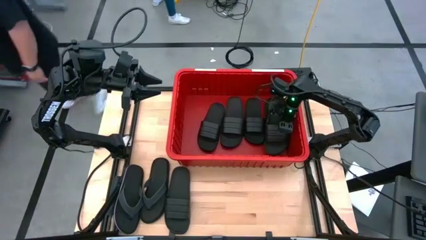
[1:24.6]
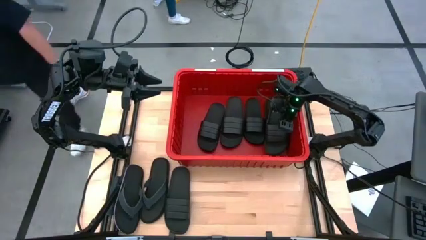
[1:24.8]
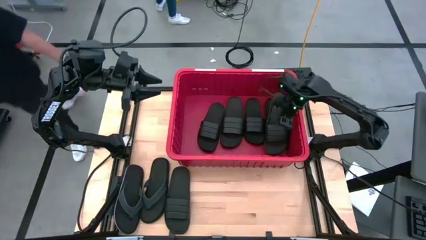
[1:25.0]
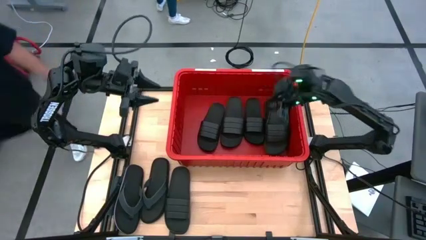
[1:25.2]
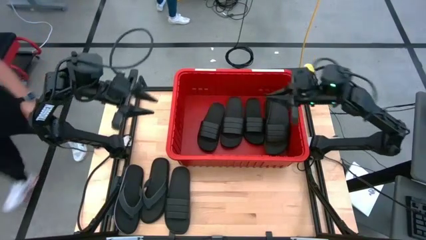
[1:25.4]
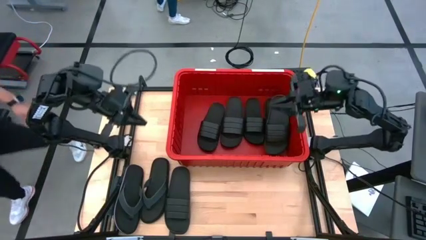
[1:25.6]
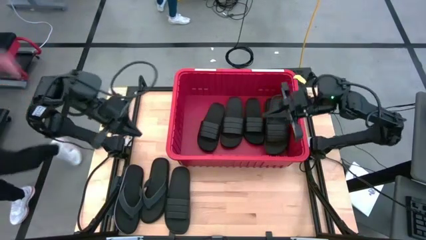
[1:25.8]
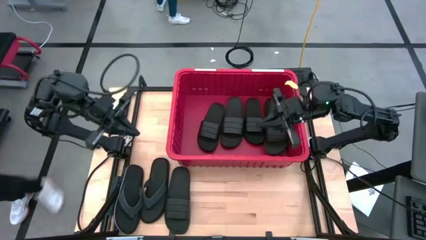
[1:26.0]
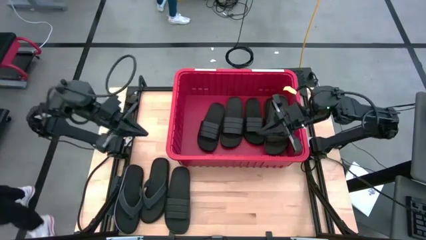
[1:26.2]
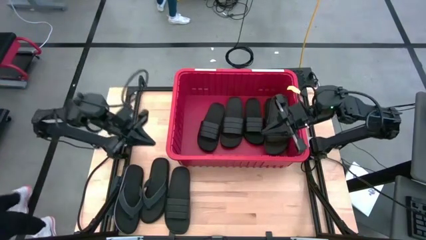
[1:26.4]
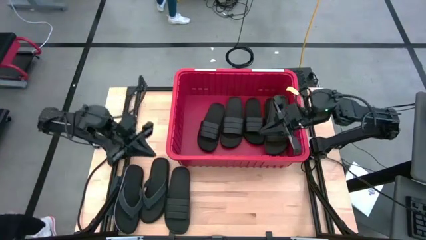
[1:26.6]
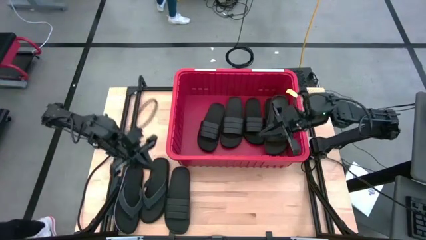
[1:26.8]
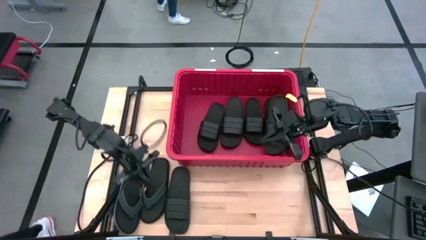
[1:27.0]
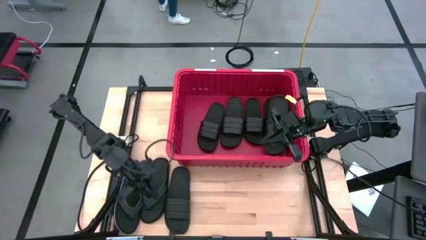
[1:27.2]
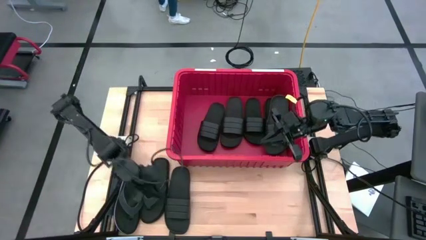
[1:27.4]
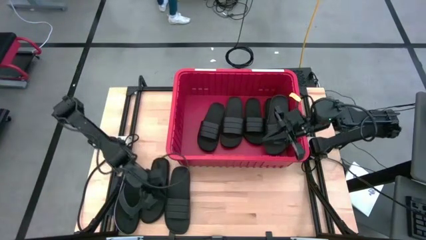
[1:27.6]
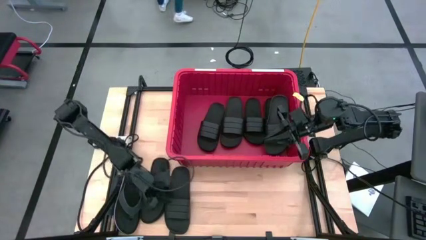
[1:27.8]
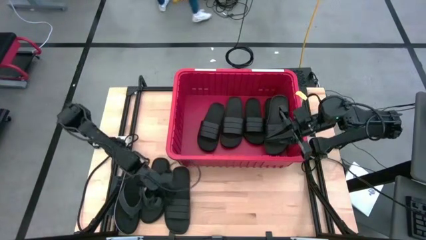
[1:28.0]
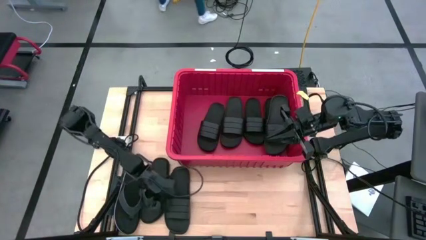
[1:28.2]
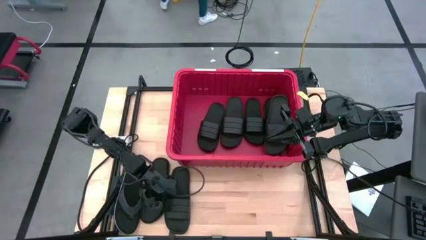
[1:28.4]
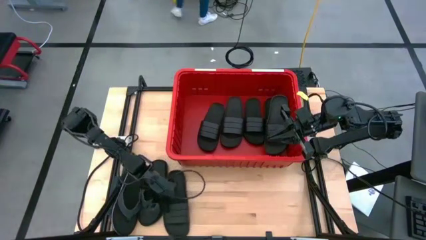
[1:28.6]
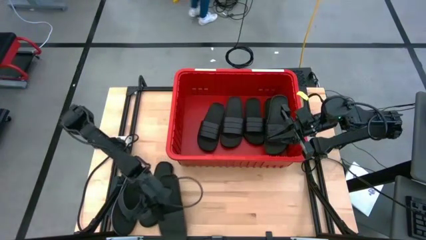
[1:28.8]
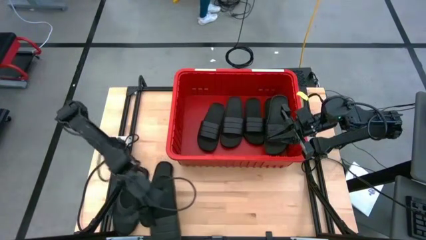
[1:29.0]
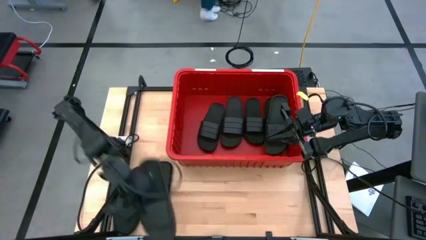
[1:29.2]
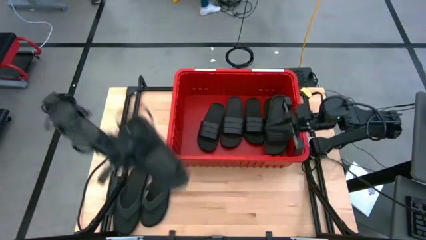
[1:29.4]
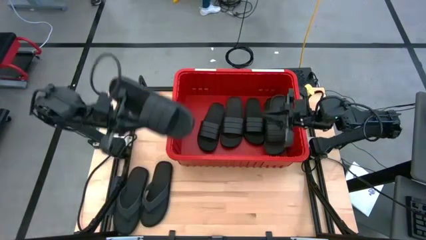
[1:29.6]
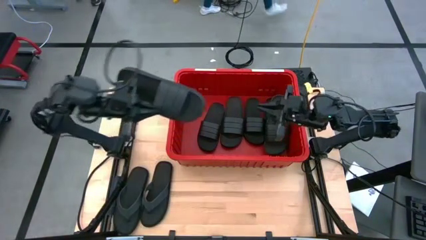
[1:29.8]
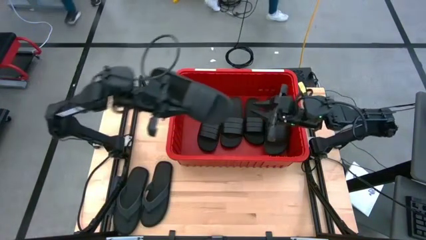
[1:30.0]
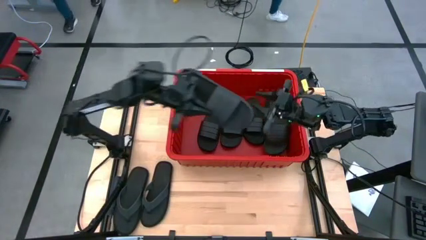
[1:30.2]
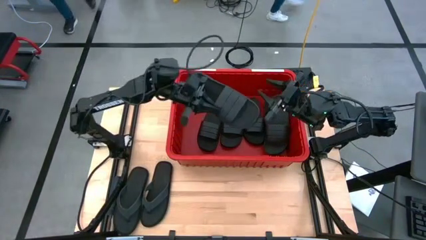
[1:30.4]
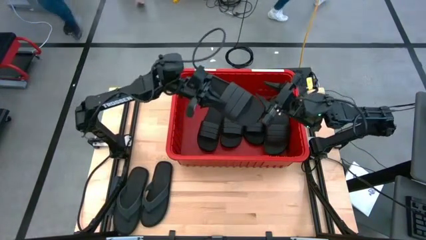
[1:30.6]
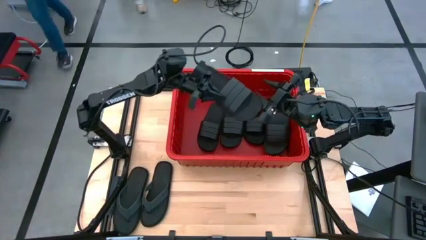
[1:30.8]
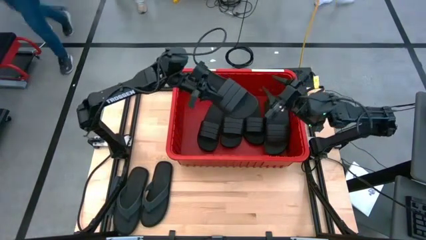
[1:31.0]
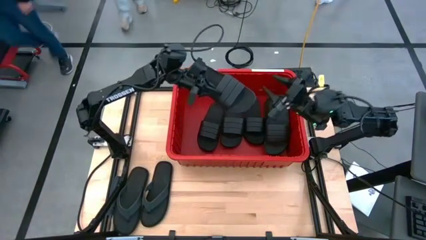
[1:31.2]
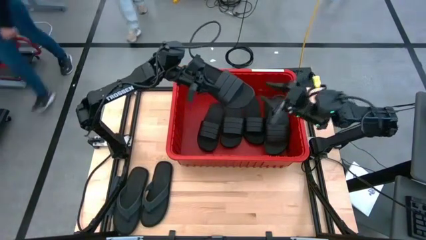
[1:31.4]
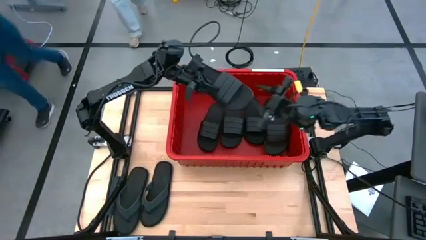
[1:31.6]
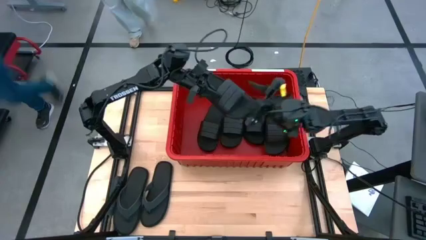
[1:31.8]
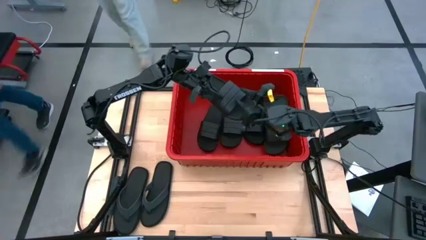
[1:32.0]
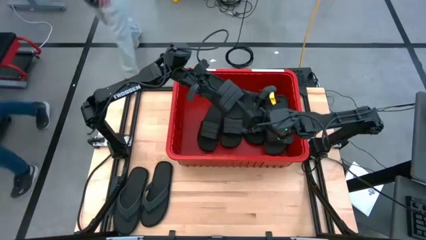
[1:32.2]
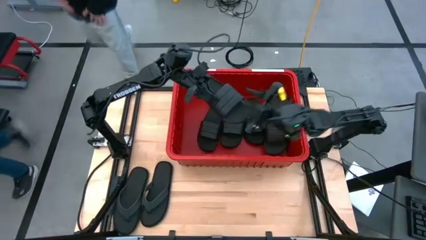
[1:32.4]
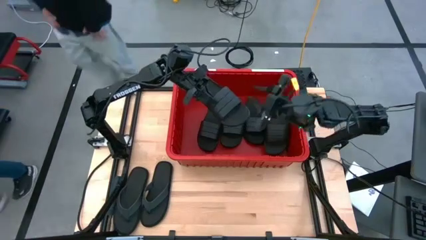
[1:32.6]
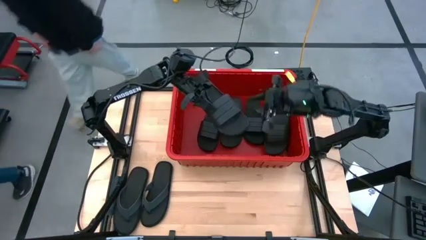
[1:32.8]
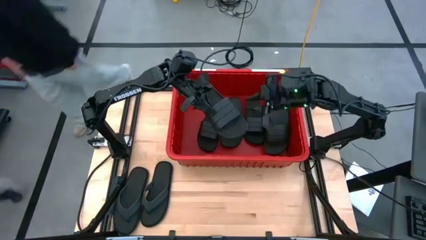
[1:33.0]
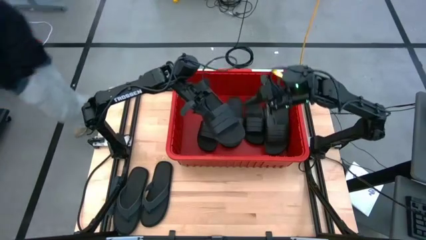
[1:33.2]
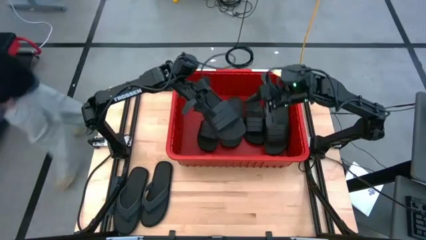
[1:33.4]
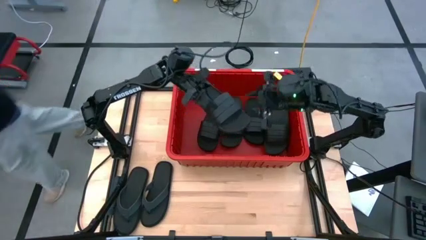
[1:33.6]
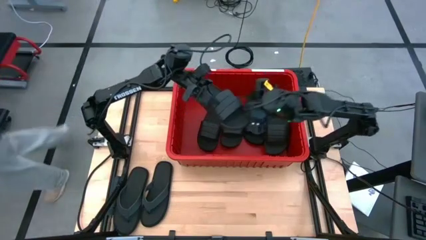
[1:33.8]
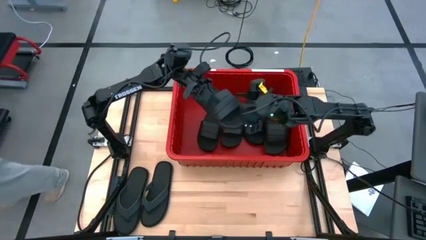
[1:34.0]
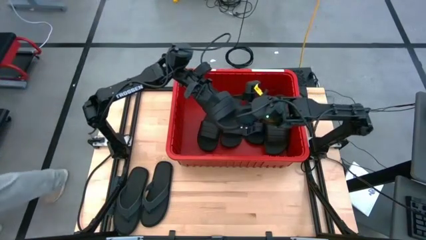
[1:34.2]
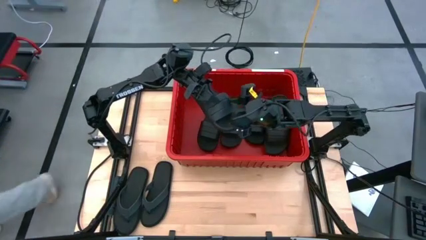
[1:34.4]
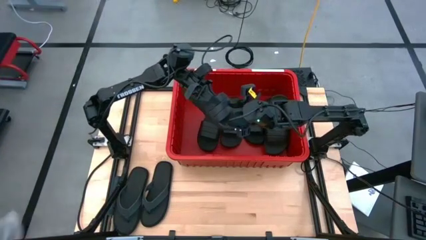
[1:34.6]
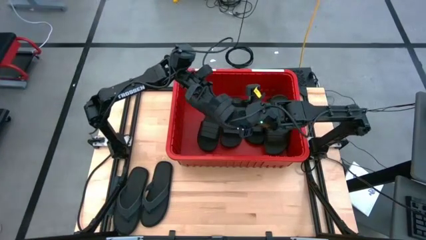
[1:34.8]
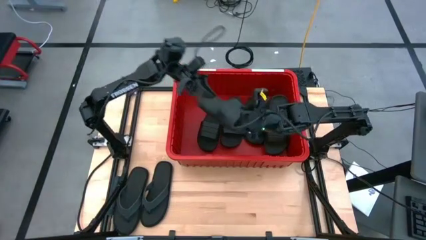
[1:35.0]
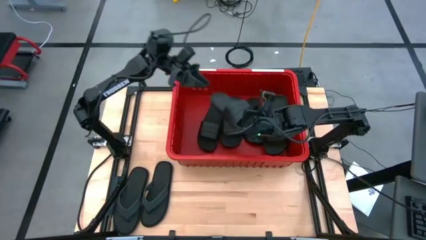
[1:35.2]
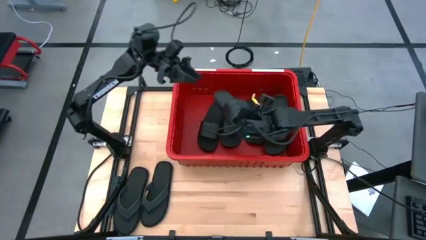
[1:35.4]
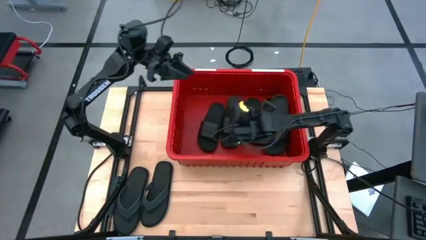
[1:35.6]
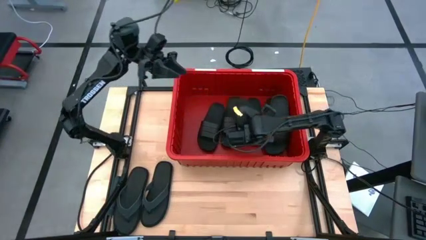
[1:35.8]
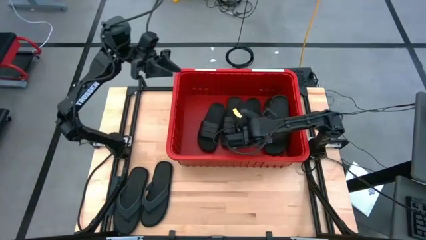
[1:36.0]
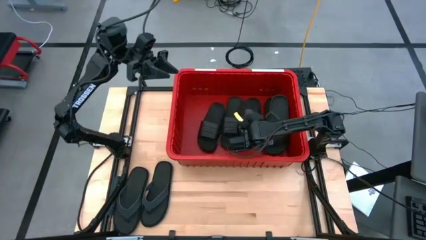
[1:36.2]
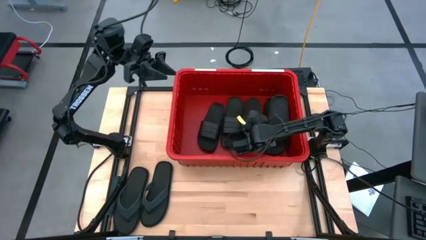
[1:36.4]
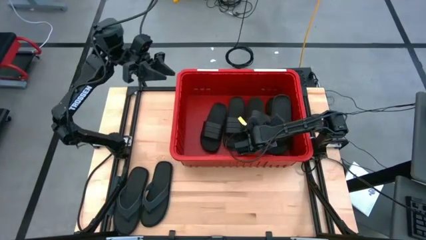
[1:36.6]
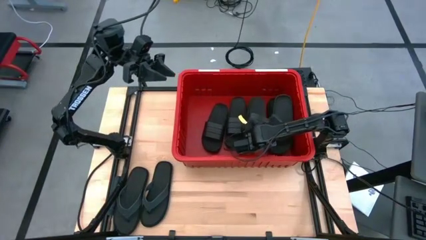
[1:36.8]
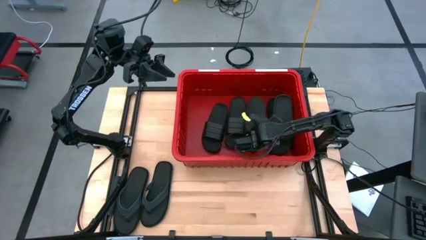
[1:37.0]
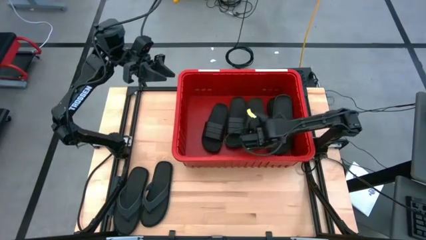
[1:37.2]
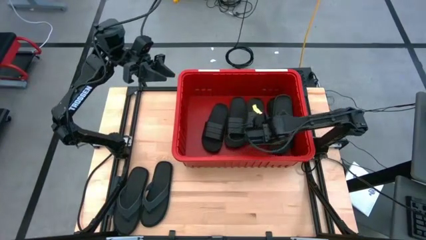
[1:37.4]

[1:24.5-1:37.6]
Task: Pick and place slides into bin
Put the black slide into the red container

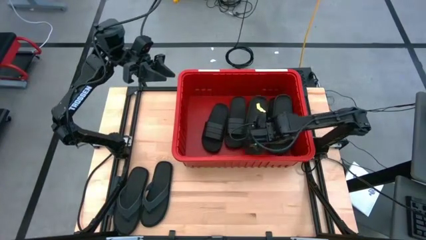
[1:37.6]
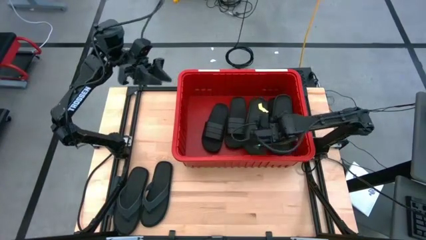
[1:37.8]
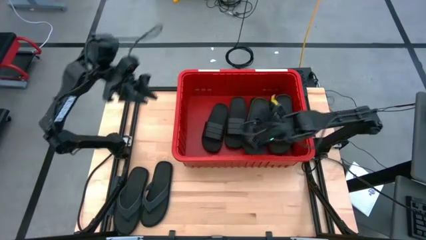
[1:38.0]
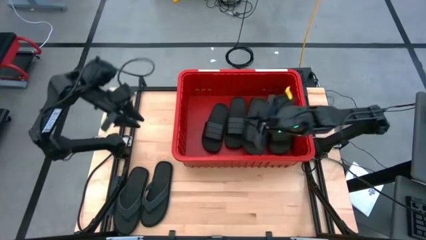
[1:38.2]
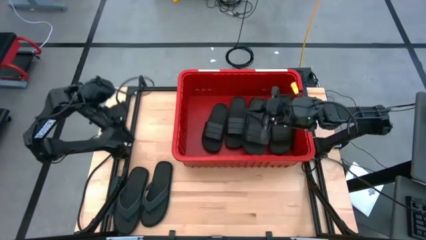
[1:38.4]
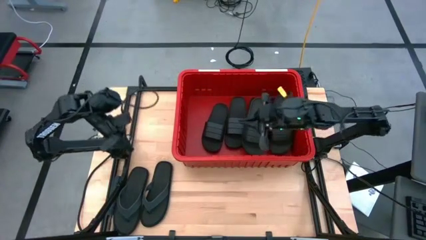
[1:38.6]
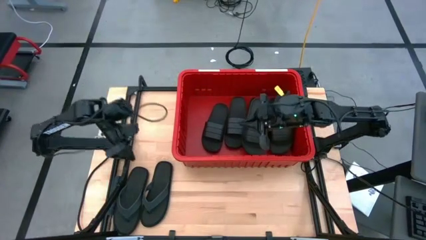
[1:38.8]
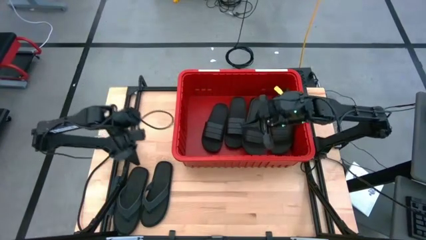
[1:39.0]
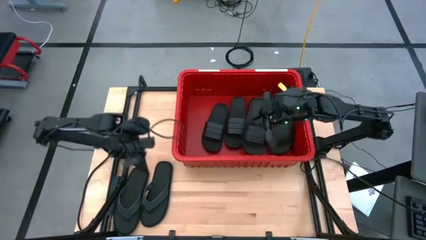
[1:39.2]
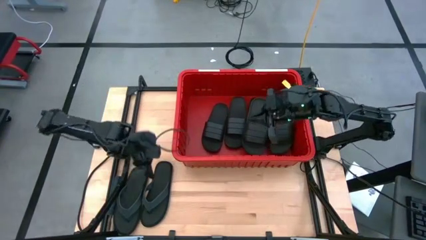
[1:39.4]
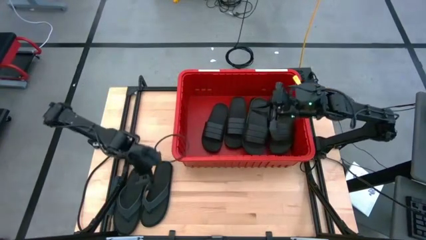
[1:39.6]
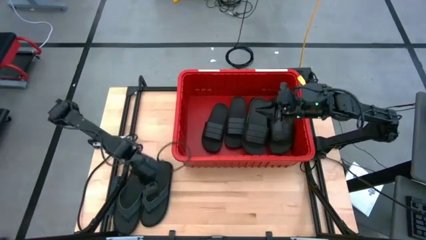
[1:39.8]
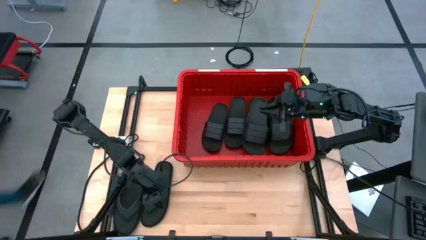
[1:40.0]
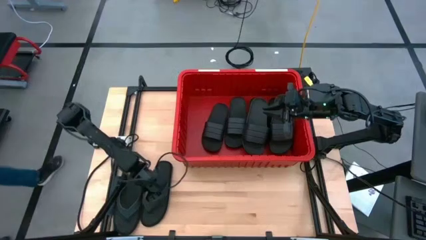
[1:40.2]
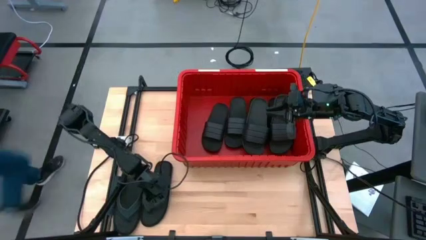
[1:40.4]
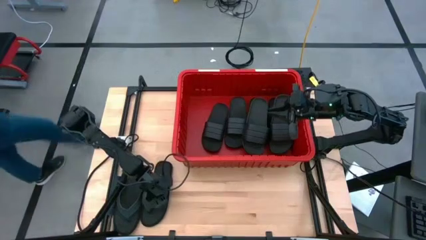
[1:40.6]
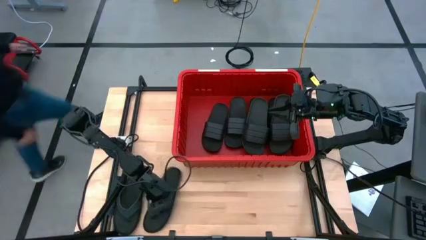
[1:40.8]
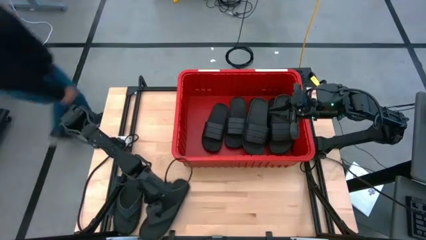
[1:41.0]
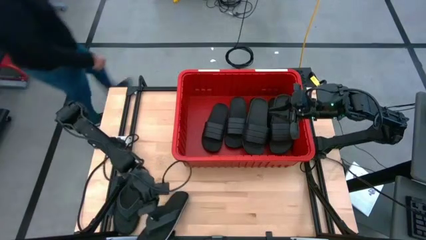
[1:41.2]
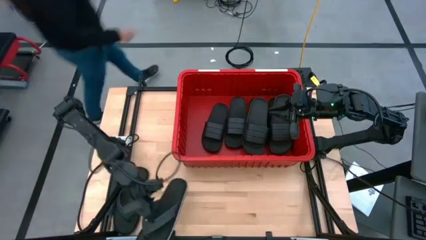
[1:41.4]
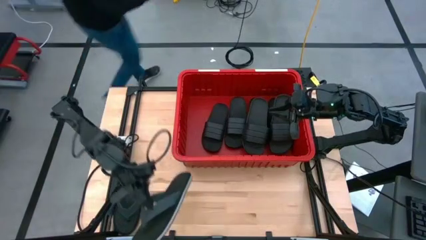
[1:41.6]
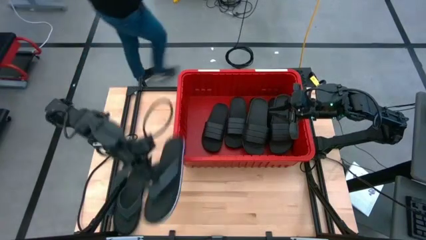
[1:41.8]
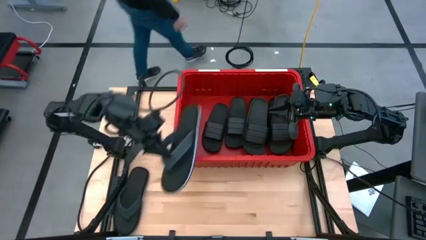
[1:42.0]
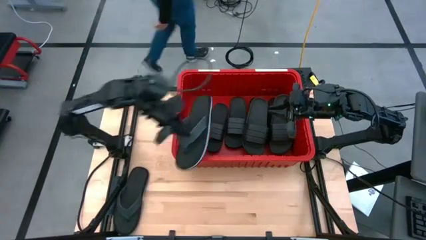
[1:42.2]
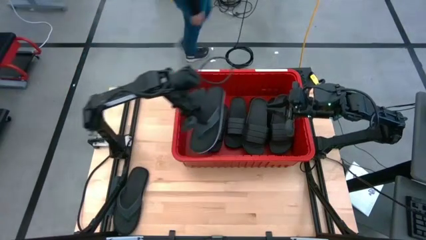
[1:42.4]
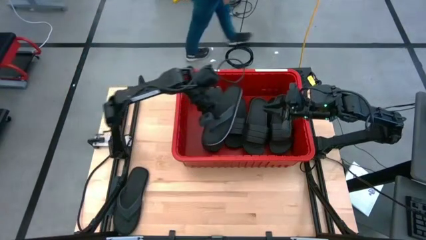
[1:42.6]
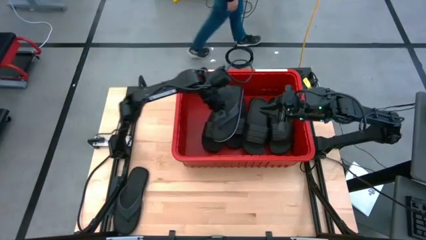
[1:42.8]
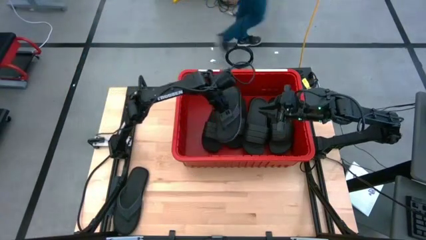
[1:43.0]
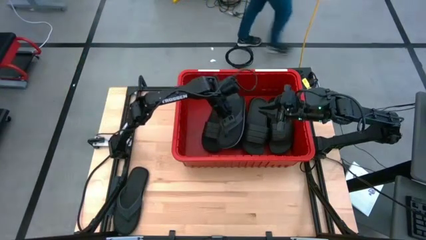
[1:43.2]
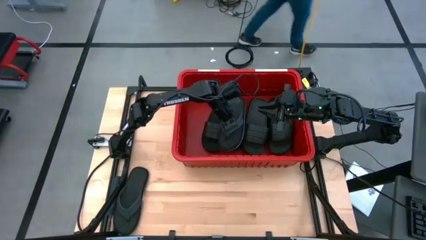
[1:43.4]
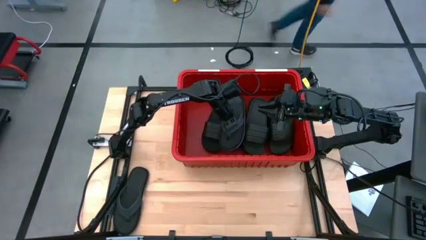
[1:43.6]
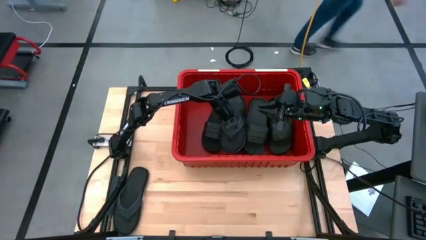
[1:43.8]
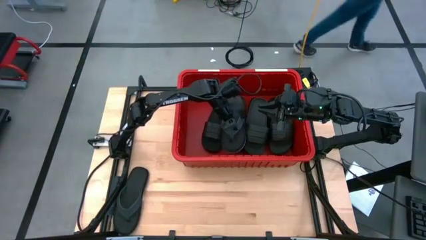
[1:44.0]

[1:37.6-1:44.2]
Put the black slipper into the red container
